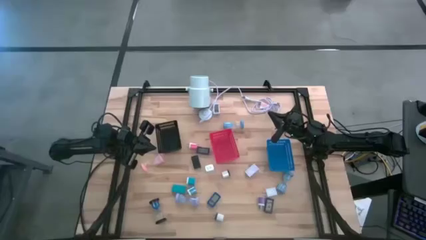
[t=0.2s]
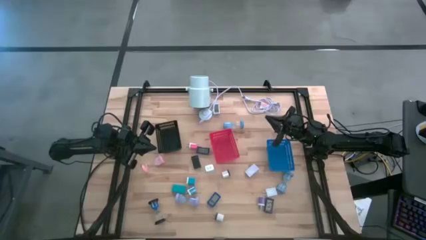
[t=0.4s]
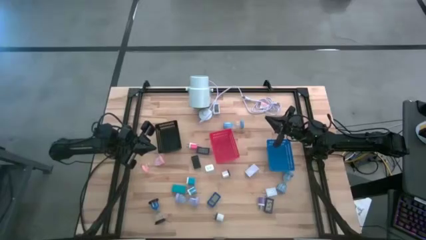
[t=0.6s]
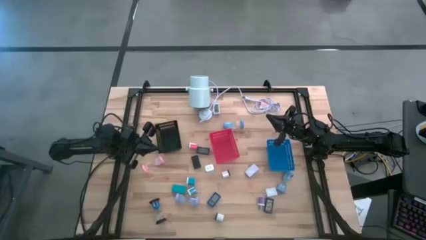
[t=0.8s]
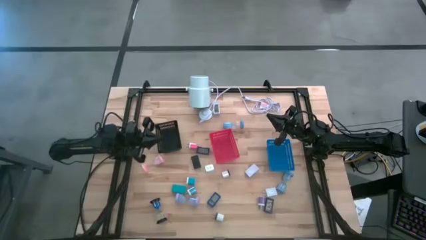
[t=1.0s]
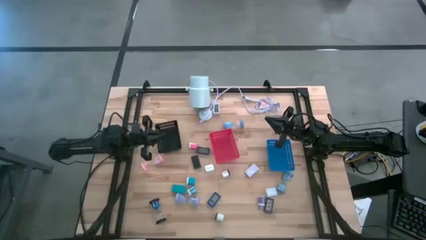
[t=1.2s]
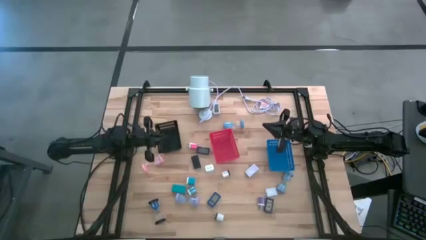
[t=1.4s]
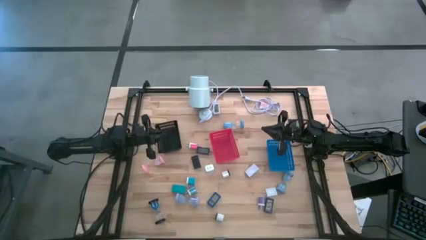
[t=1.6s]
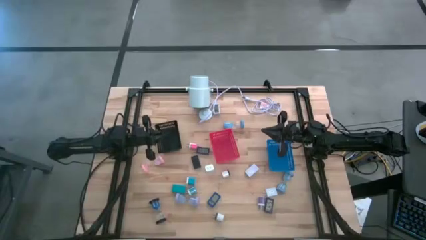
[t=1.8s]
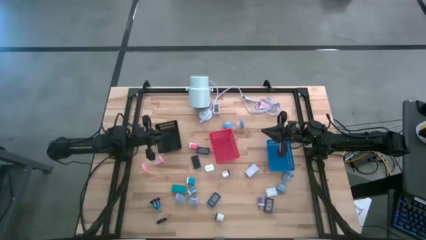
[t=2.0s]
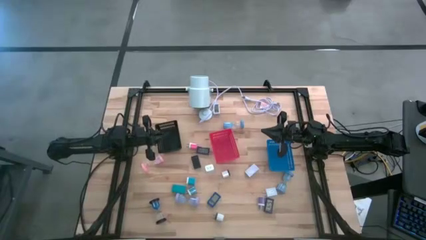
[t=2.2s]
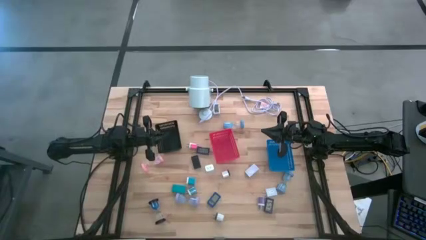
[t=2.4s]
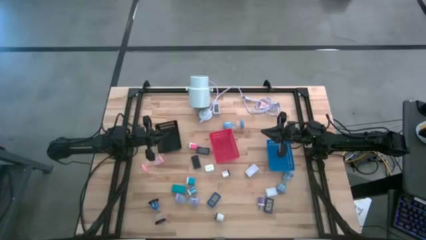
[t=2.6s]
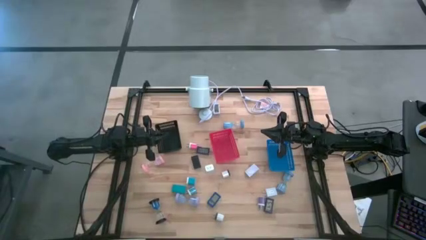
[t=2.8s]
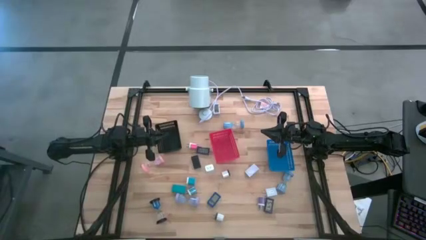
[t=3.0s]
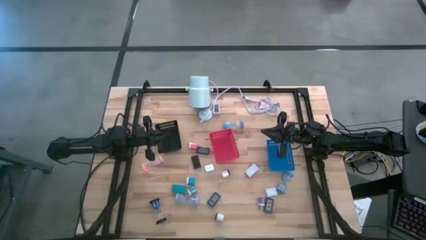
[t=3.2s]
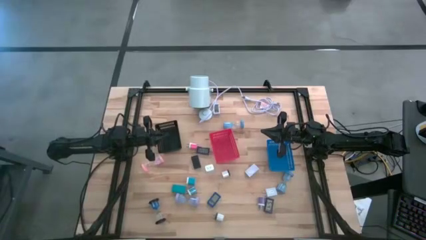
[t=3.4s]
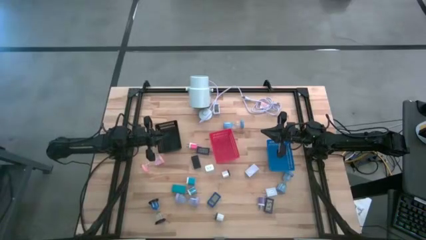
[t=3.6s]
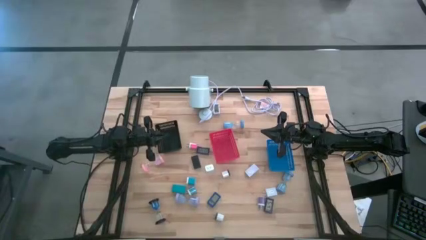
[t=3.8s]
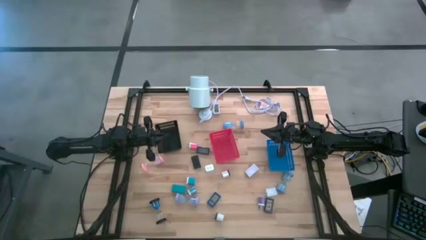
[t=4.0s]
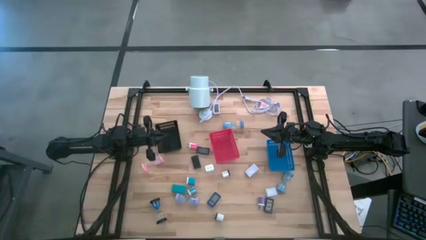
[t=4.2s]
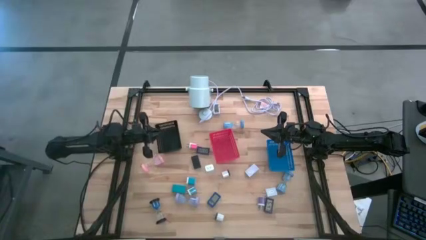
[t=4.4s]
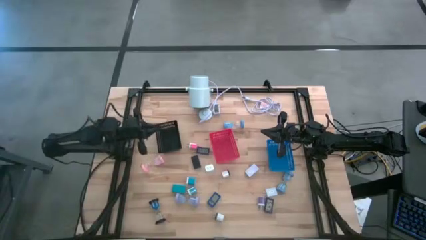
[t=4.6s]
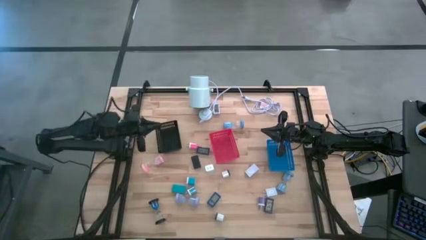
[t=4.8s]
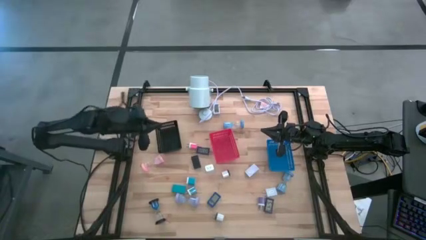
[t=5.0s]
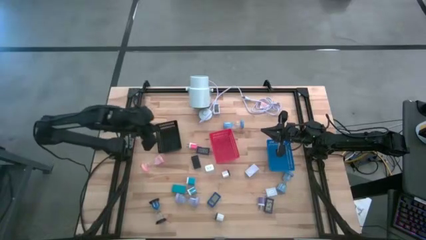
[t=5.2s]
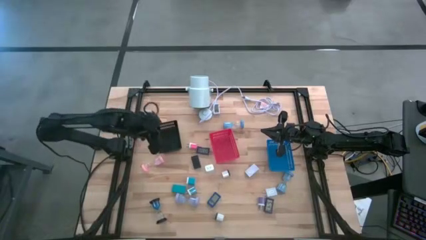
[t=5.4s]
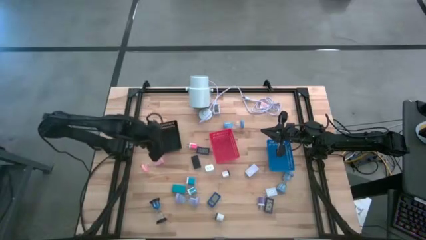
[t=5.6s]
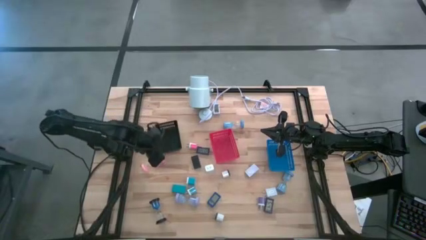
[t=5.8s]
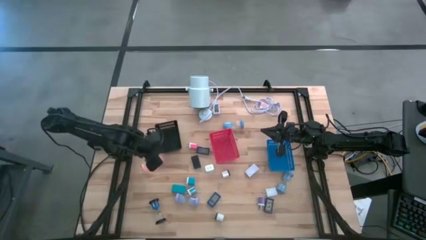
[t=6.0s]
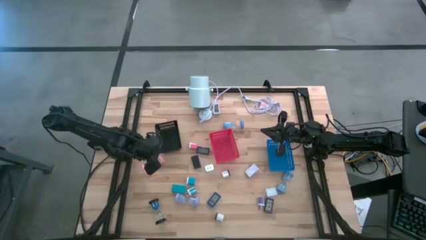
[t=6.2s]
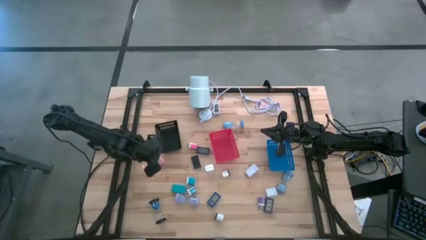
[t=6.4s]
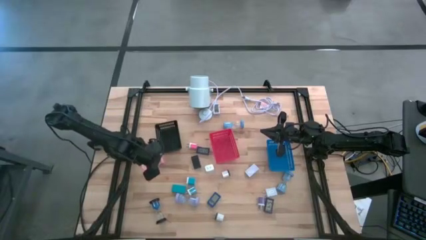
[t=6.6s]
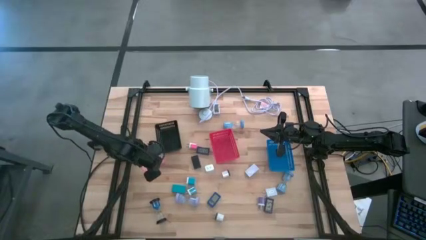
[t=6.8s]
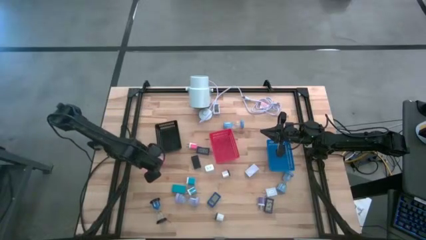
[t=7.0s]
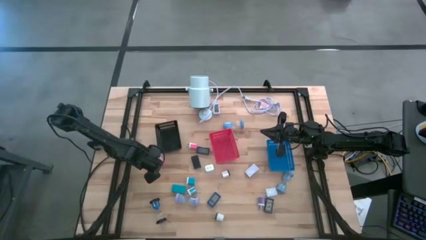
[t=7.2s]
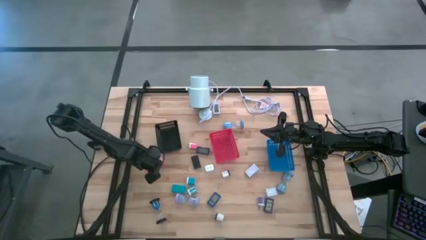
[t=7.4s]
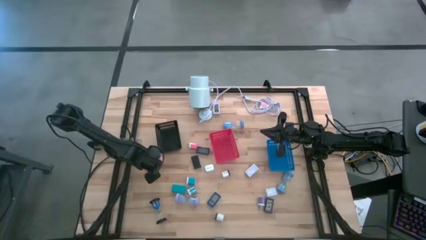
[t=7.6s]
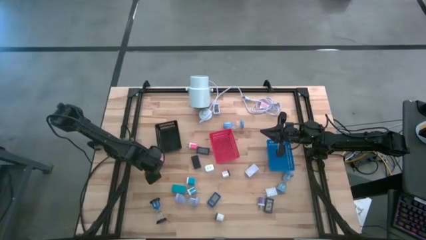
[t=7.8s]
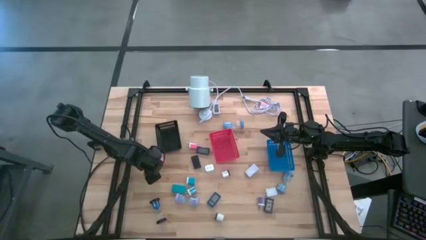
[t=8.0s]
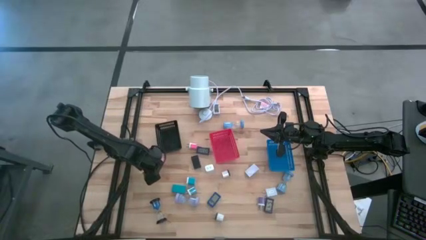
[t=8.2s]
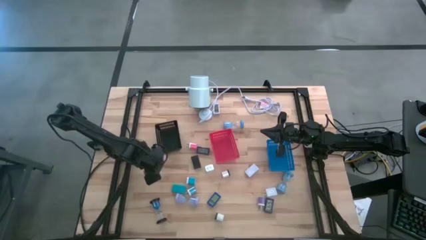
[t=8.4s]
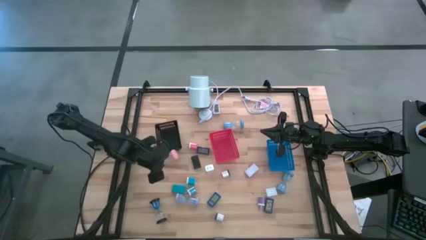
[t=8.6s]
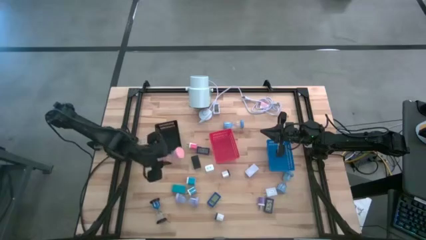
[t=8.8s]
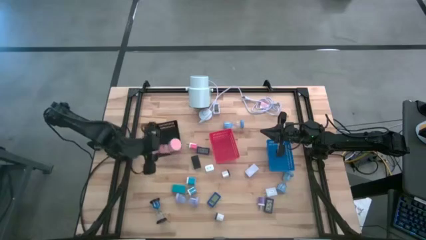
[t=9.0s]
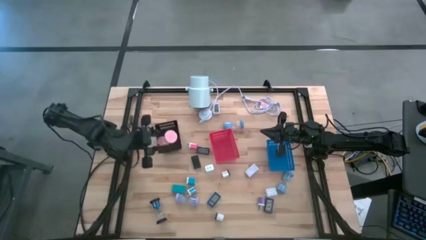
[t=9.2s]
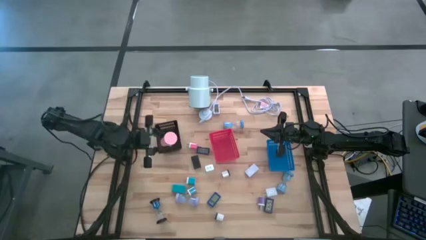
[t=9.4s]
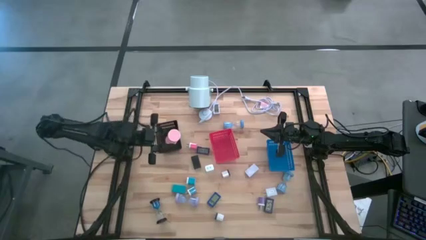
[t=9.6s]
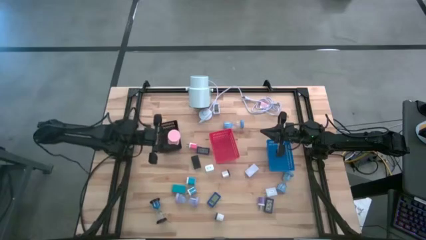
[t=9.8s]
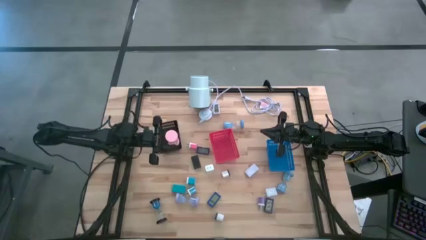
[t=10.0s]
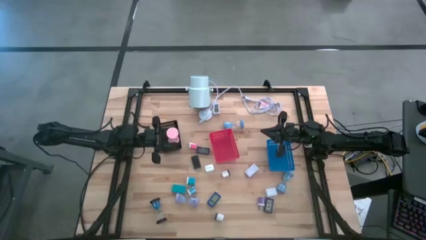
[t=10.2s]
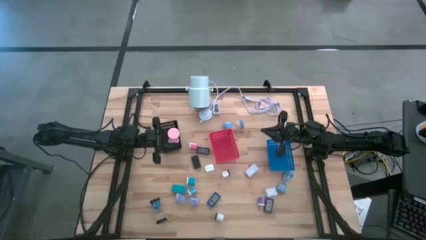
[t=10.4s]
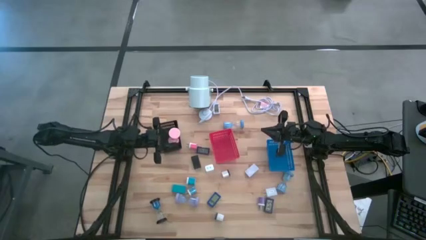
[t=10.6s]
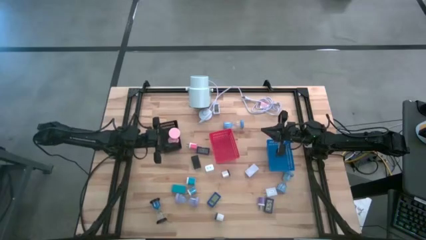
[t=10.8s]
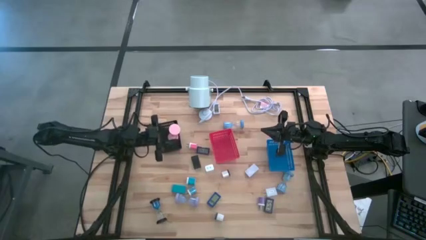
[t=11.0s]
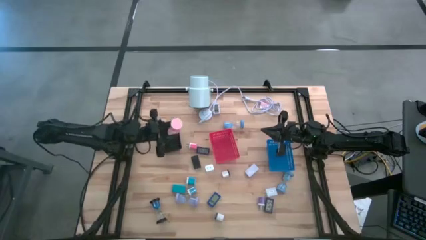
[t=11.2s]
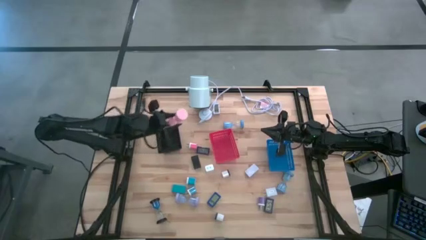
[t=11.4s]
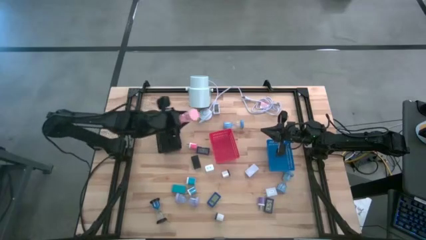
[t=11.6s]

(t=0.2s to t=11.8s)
Task: Pick & Place Office items
Put the pink hourglass into the blue bin
